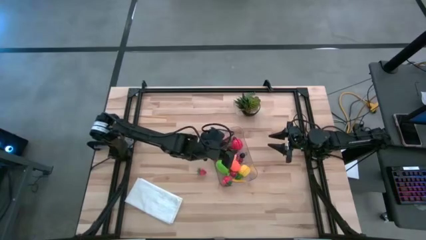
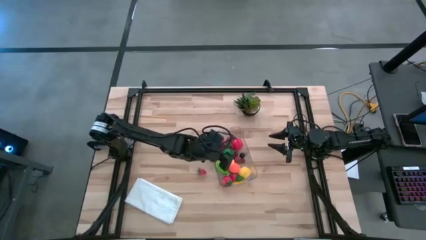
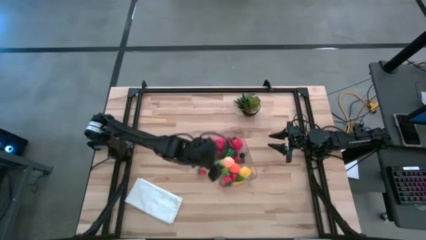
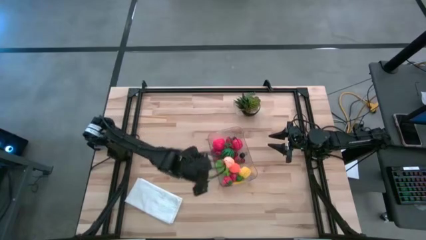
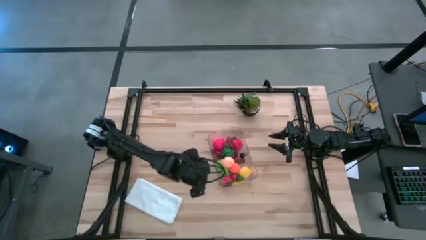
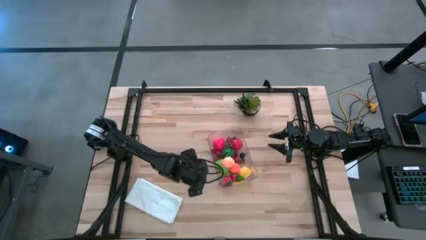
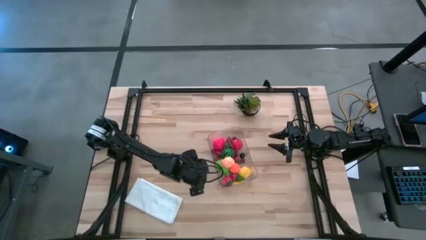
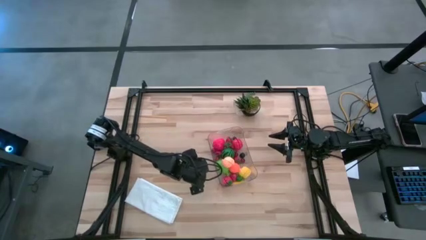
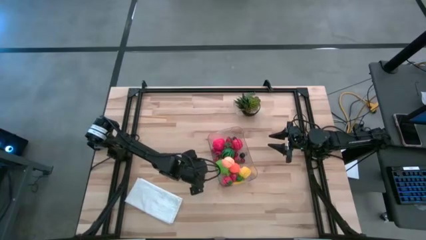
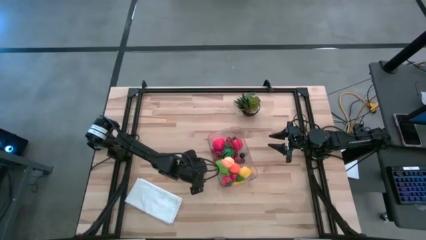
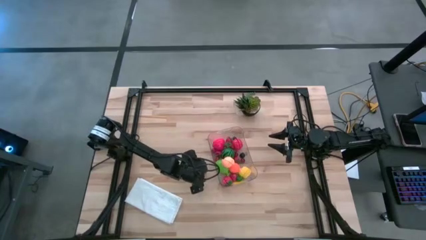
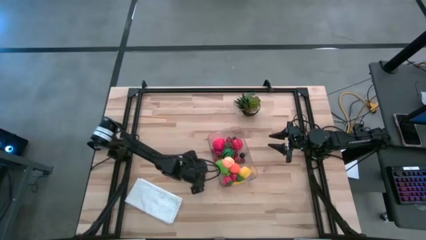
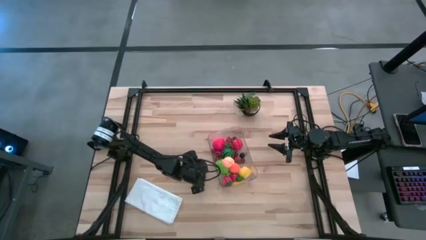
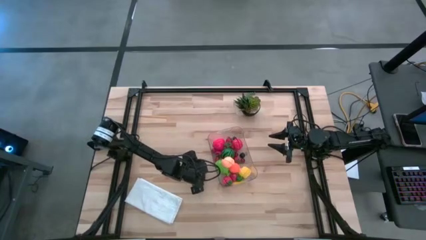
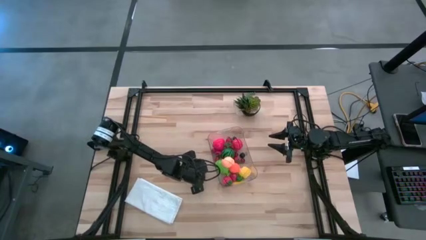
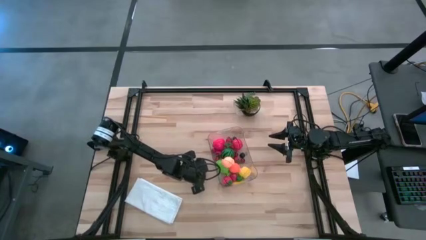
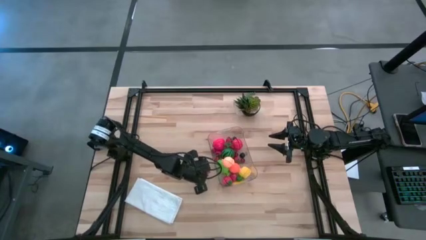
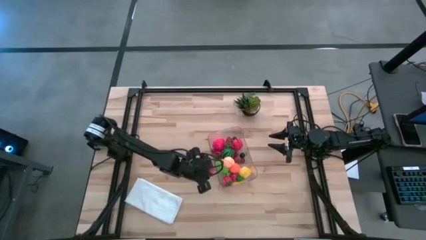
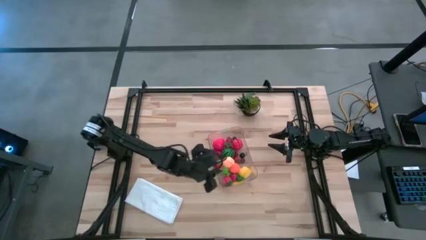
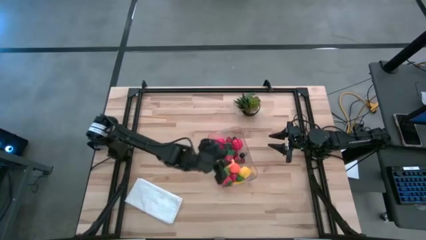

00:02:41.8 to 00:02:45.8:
Task: Pick and placing Produce into tupperware
Put the red strawberry into the transparent bin

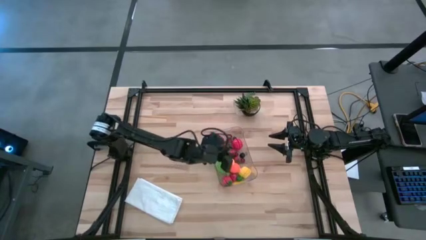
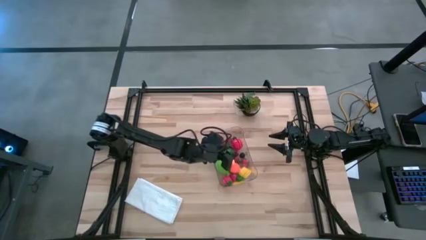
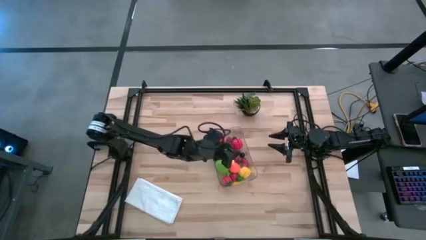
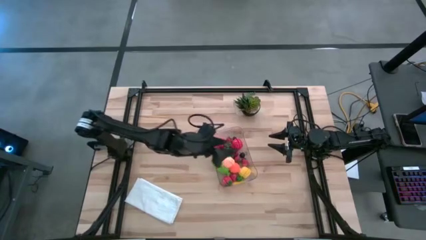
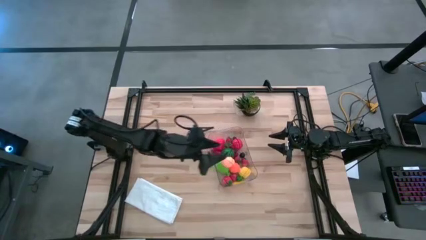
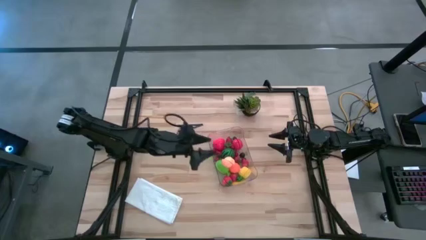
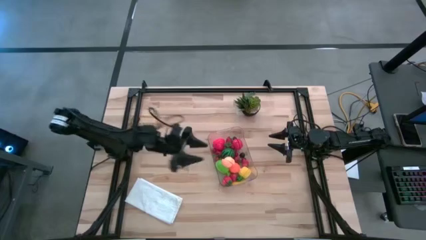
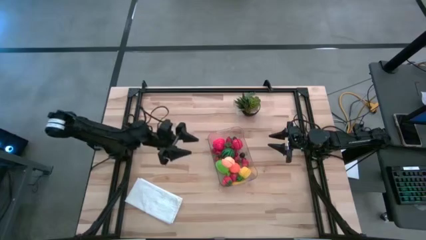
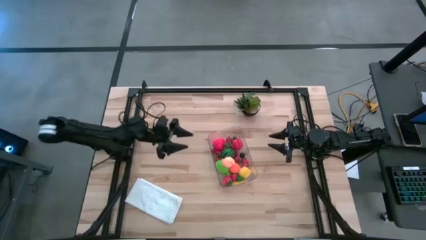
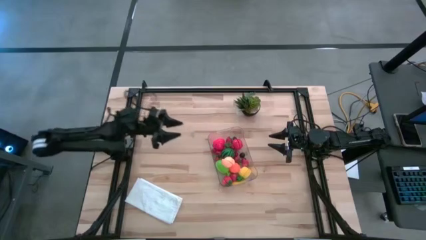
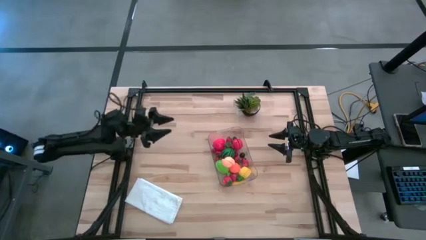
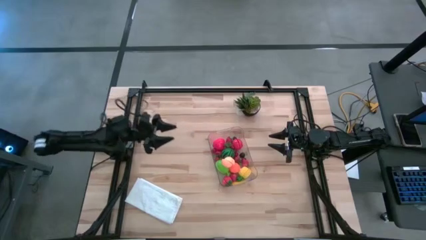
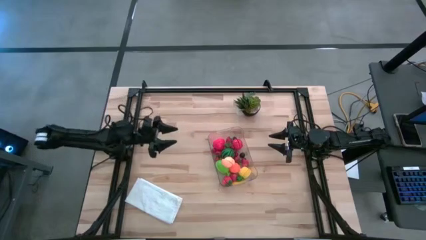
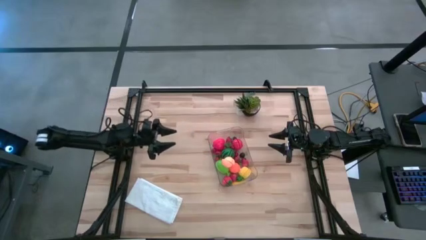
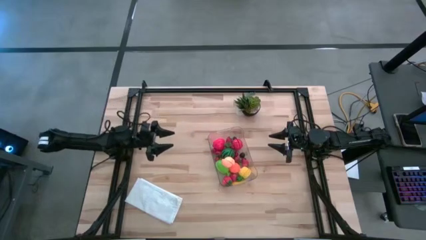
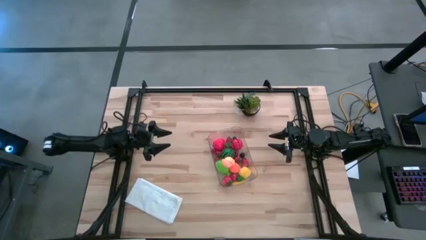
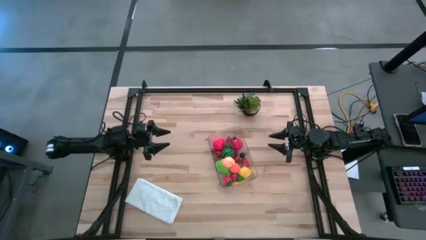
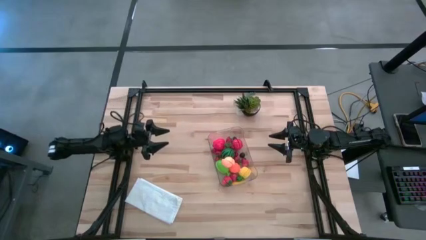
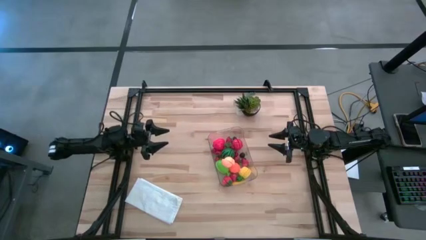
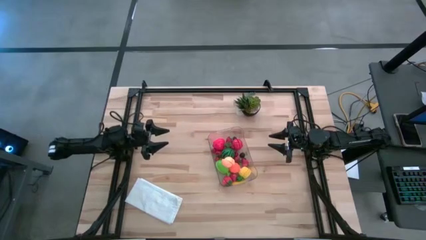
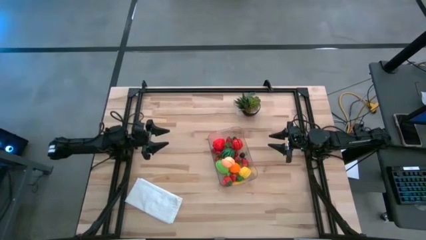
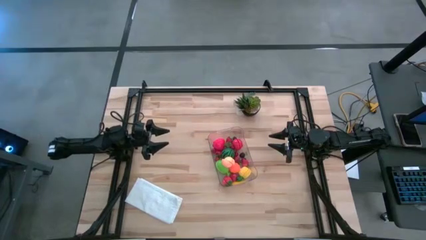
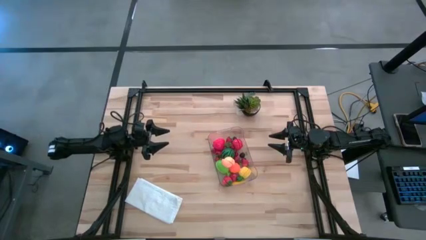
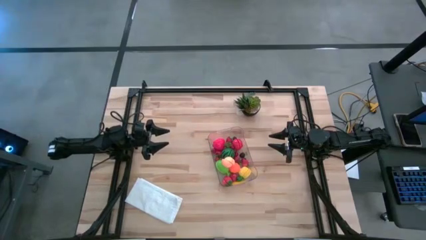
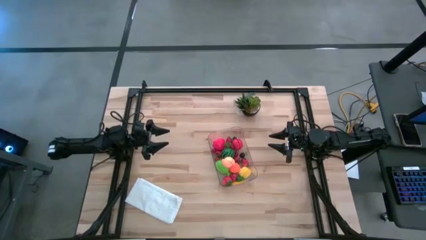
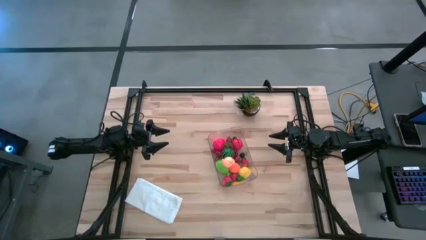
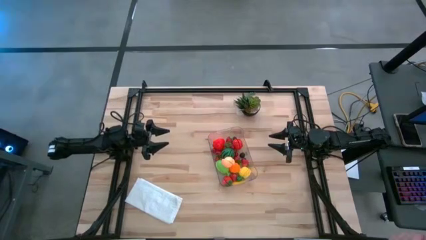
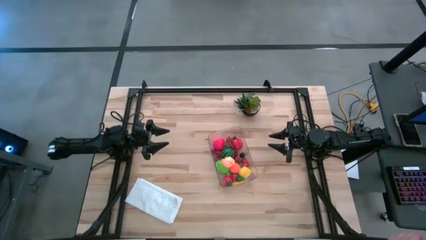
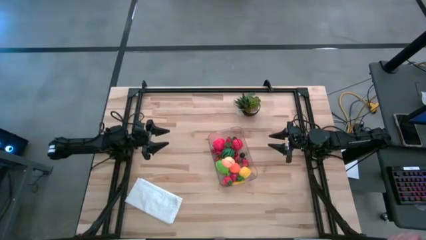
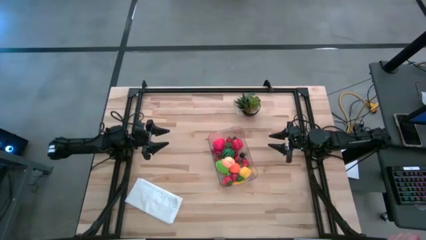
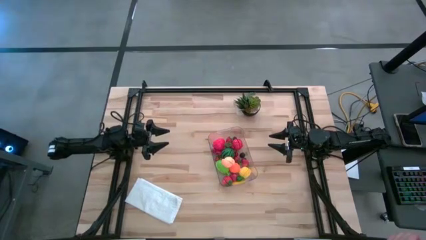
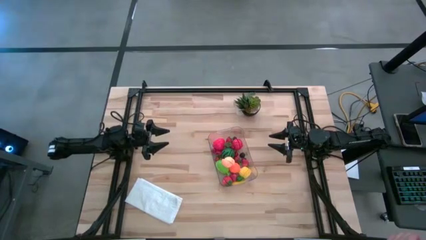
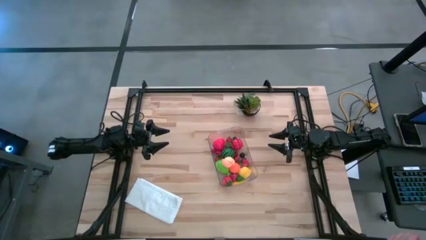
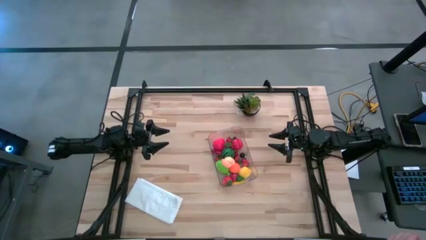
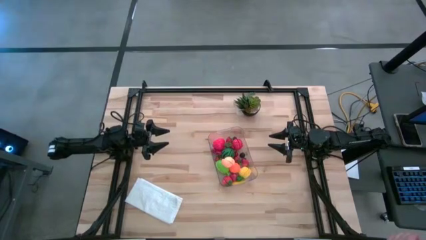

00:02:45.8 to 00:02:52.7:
Return to Home Position
